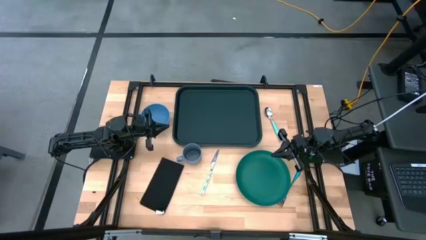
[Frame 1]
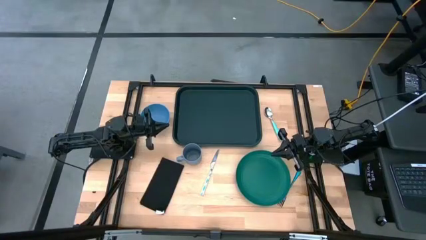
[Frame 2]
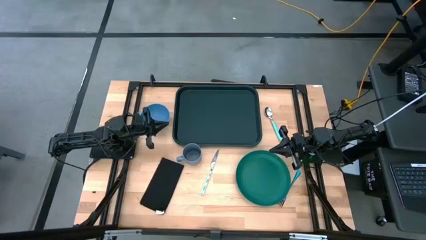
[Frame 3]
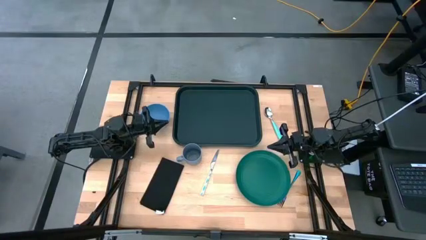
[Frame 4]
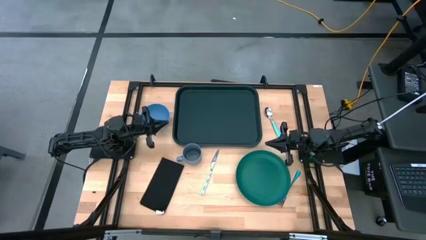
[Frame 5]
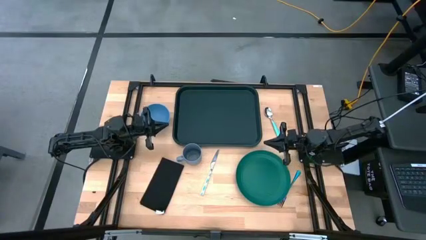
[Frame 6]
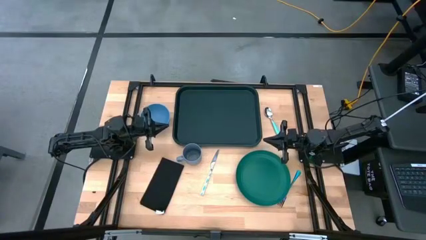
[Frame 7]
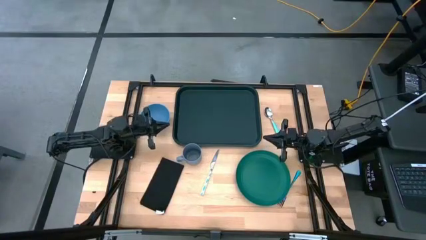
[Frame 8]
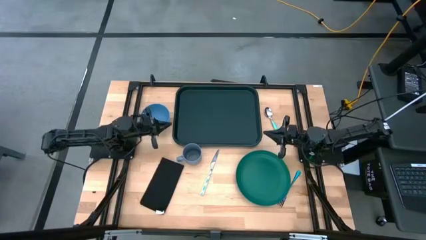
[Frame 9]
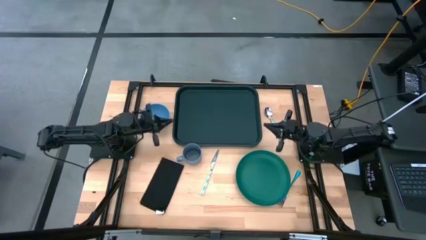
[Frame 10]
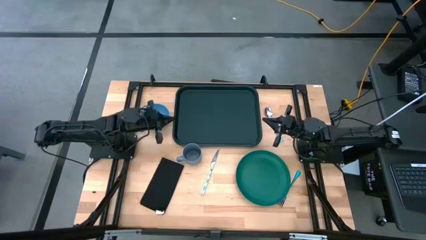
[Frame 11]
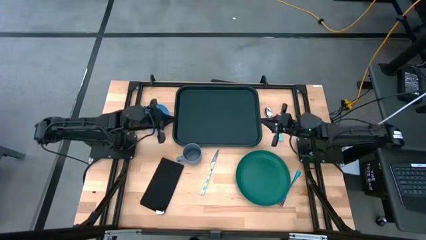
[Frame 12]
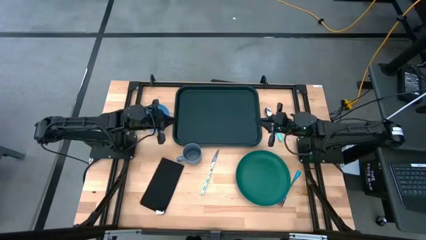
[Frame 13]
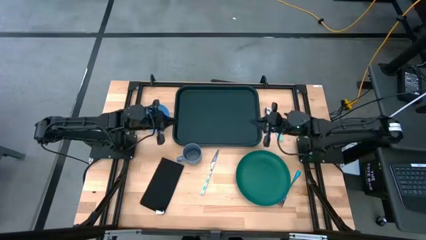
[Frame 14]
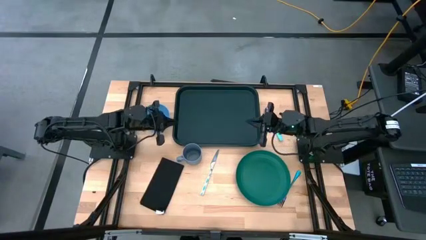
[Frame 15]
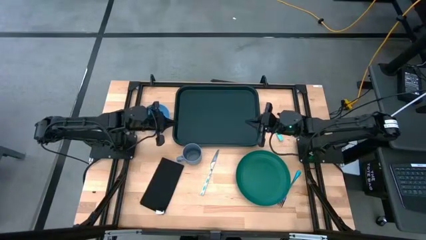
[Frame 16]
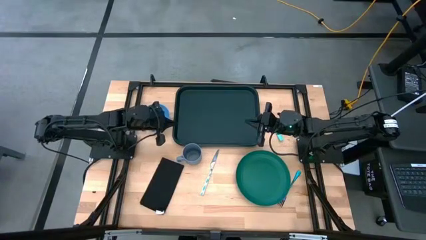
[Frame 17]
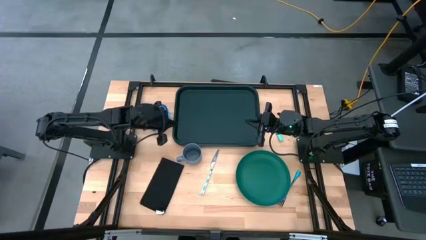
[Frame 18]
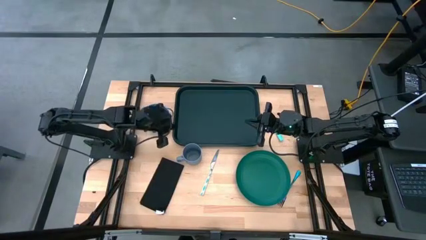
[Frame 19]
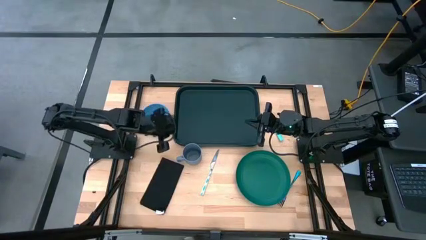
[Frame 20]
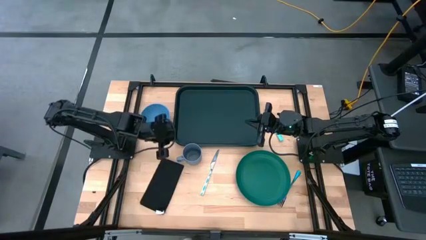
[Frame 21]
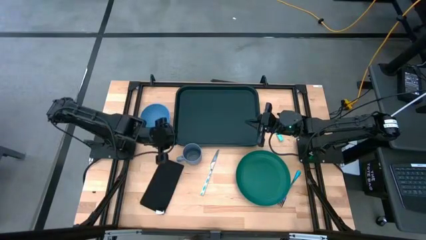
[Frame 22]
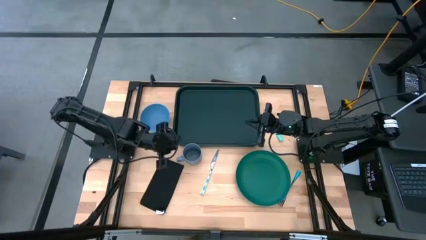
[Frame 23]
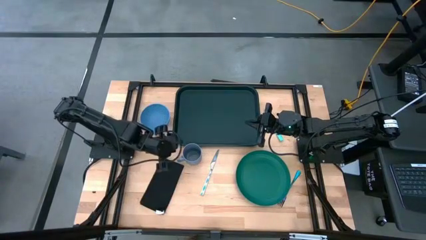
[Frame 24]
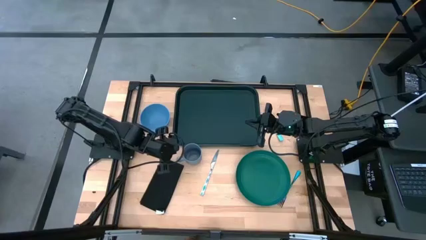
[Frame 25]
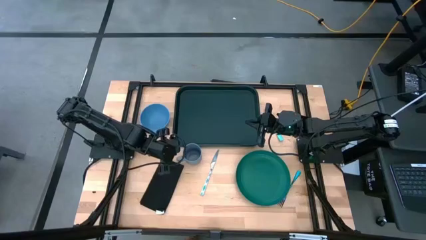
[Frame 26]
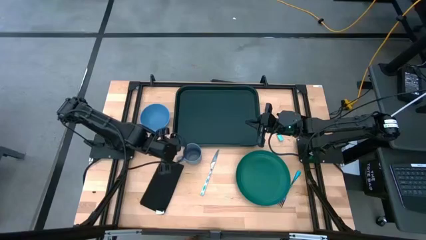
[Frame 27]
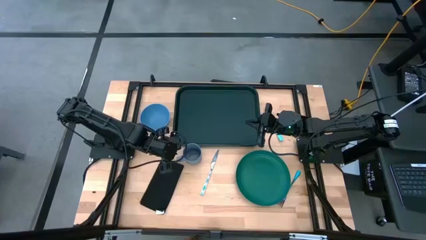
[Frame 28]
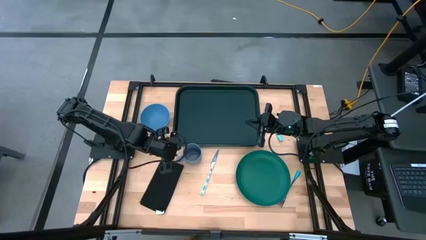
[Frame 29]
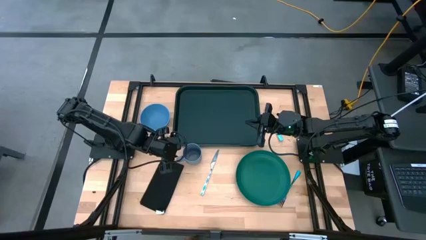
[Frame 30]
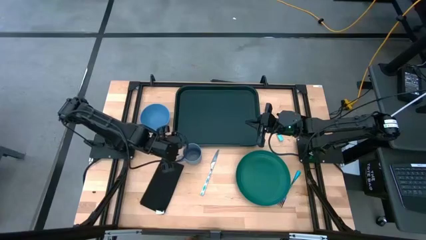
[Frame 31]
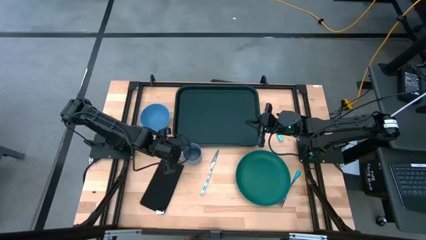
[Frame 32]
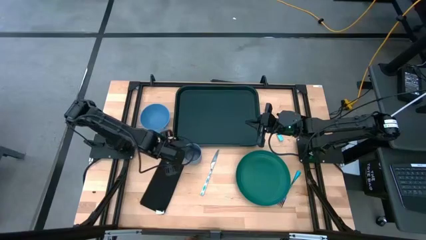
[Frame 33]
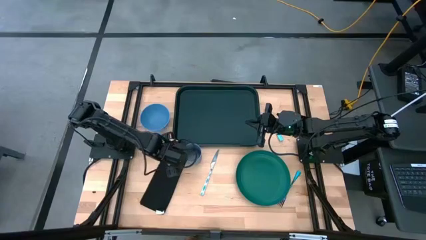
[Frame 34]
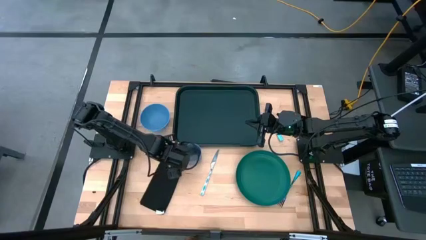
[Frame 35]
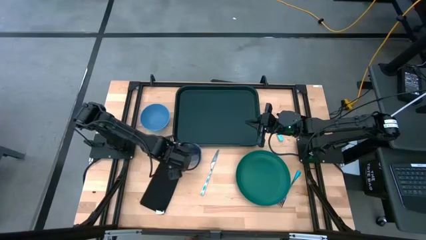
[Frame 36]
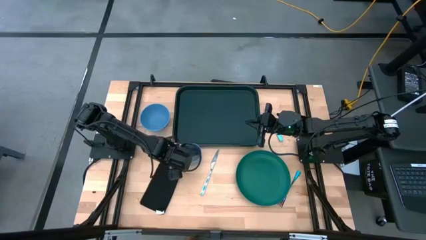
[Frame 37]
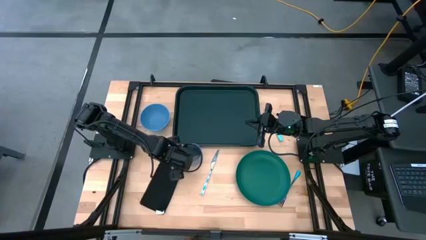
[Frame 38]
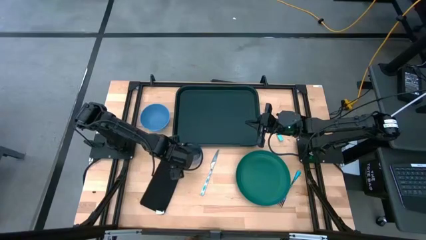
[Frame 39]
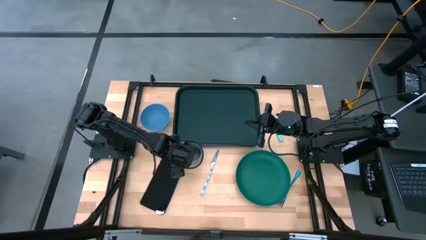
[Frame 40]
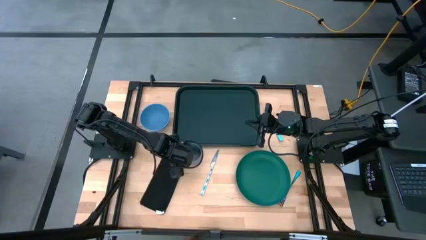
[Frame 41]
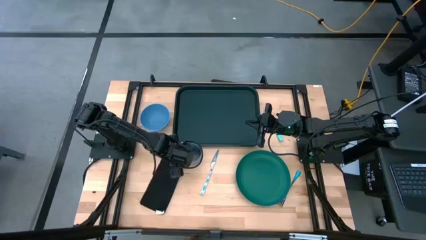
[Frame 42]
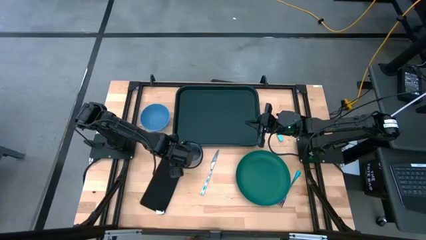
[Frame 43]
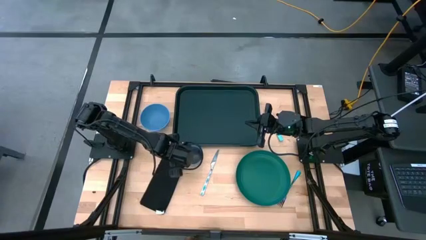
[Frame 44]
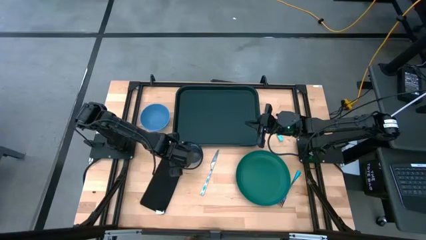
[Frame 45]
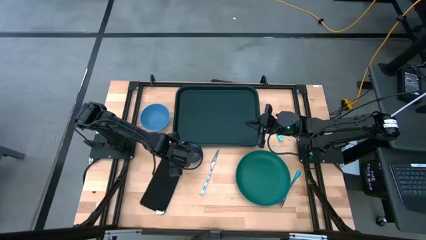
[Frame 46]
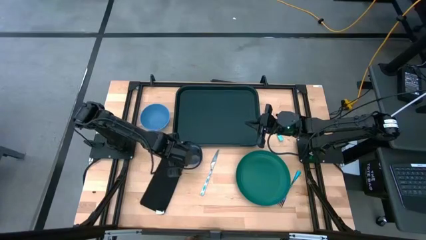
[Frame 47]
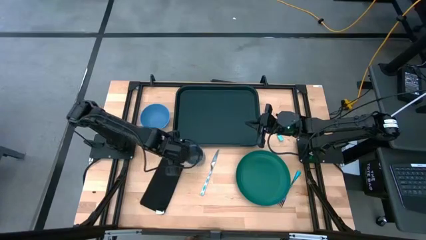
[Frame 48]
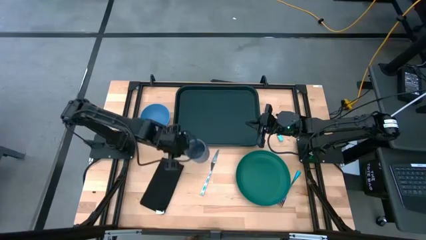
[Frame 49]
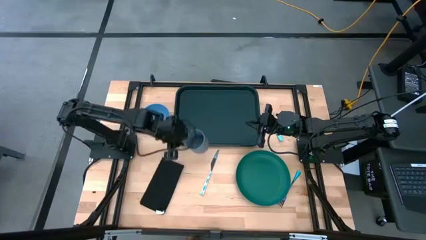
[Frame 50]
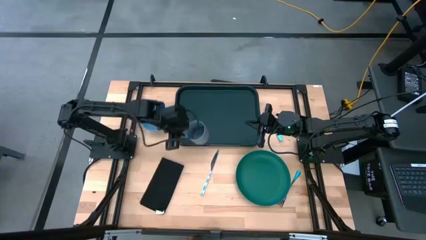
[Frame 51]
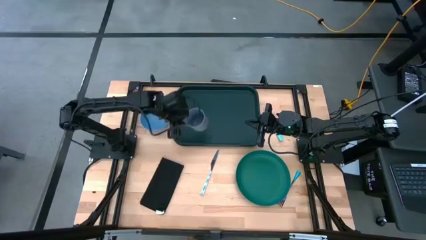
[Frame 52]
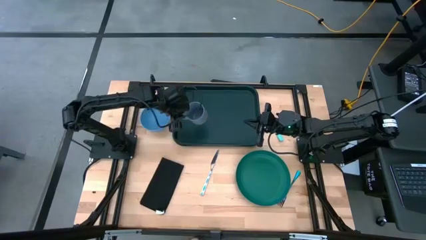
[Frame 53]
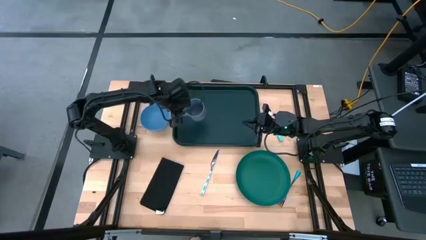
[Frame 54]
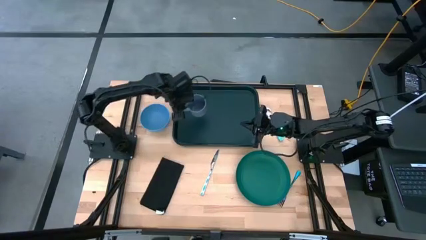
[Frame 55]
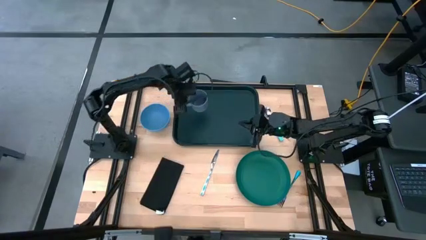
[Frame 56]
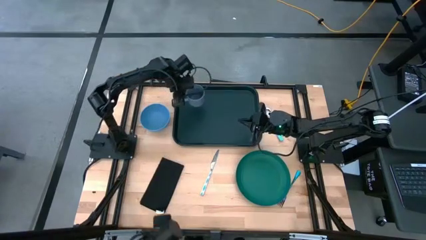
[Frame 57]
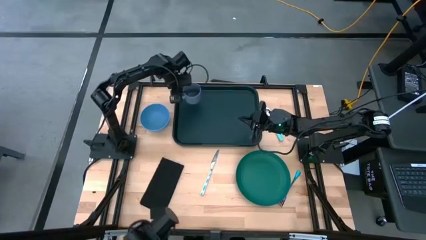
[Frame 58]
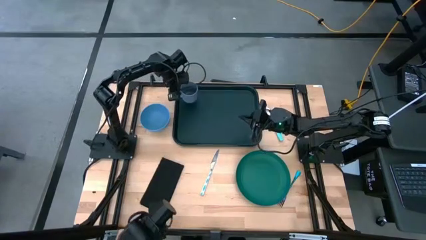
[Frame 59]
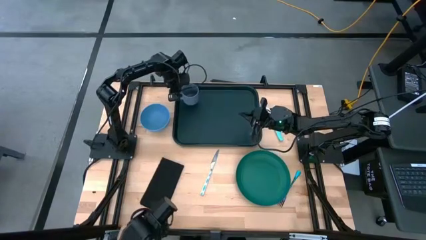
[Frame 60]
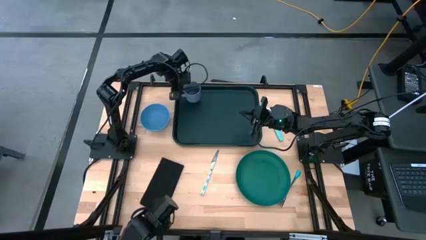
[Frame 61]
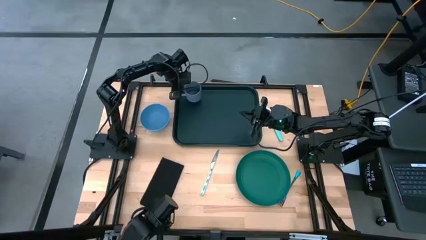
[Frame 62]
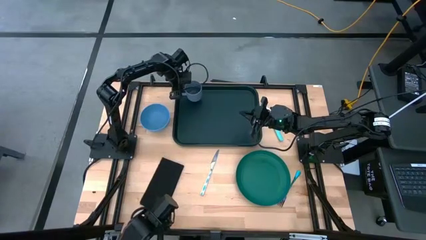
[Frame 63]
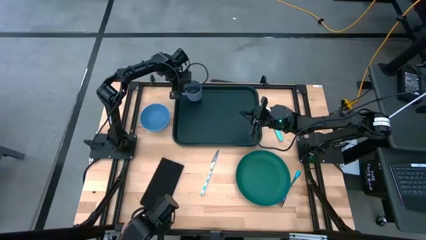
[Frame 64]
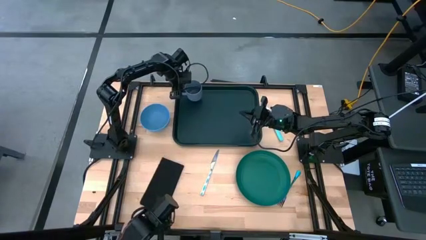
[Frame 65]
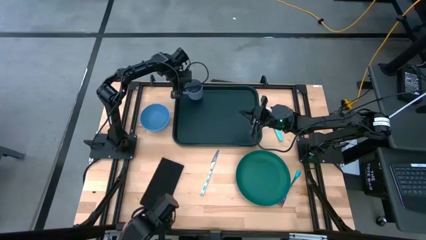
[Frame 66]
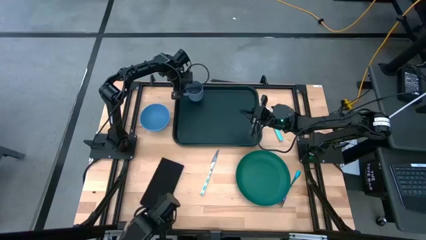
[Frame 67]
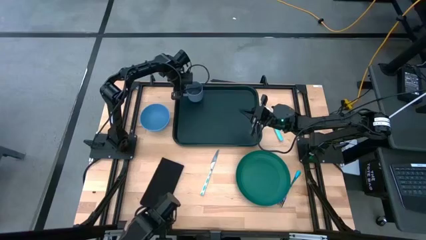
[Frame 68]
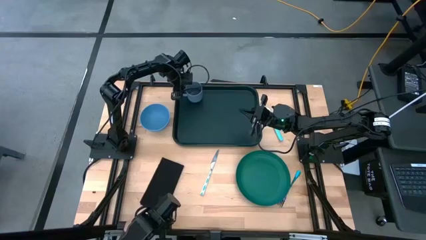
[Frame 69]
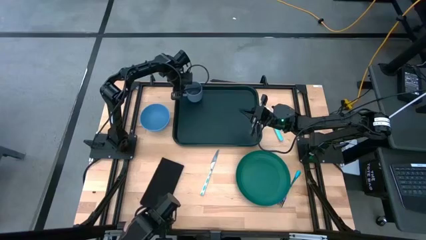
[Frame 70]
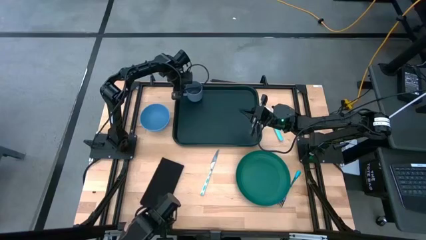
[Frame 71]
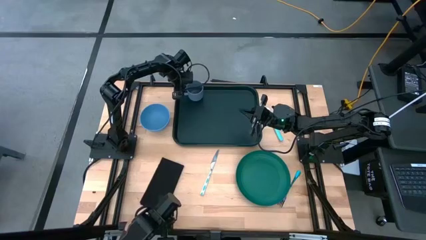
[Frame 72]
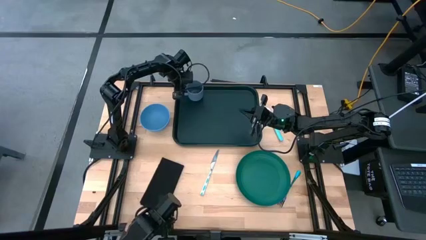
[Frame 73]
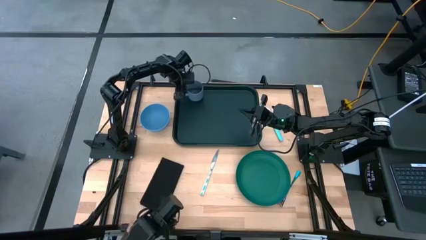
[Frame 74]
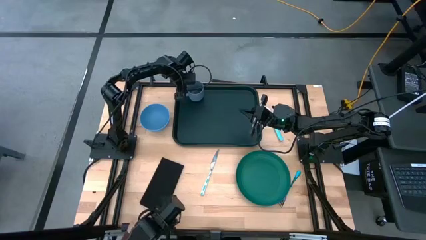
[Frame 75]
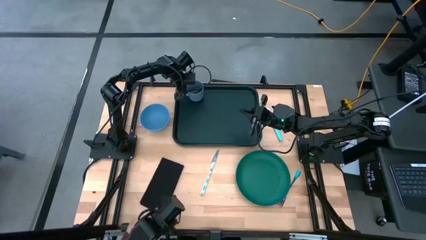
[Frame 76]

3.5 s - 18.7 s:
Task: Set up tray
Put the gray mug on the green tray
